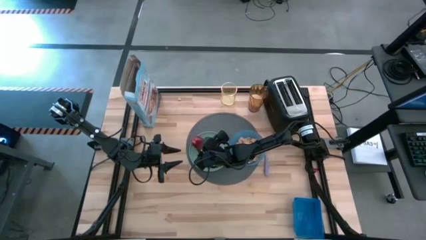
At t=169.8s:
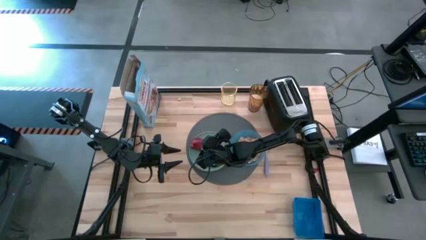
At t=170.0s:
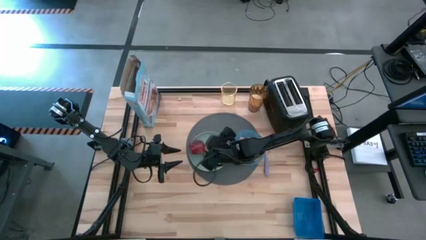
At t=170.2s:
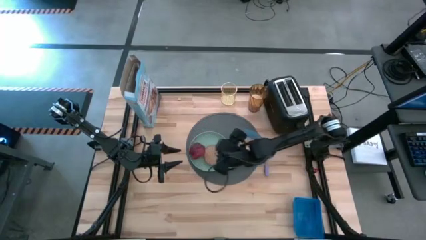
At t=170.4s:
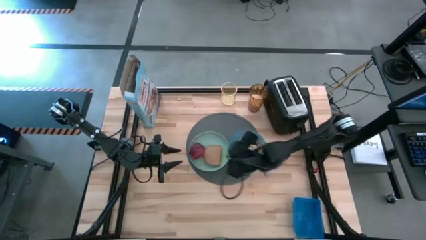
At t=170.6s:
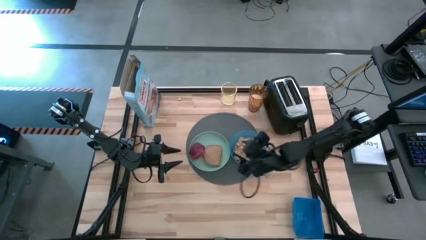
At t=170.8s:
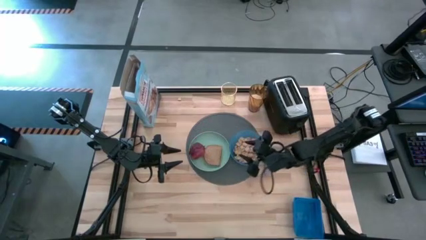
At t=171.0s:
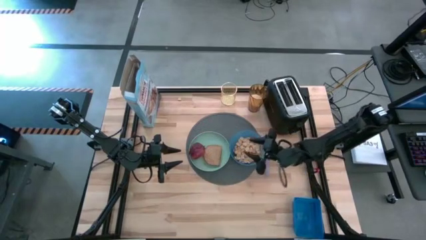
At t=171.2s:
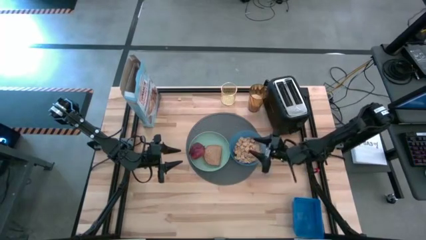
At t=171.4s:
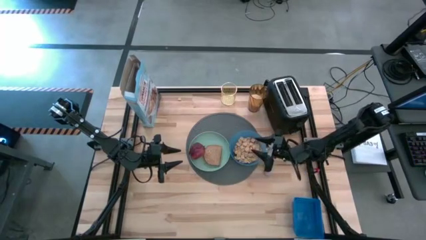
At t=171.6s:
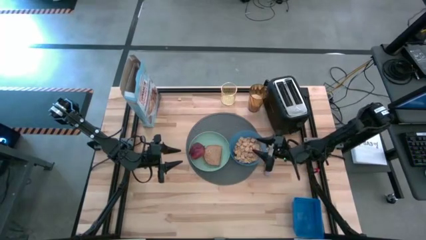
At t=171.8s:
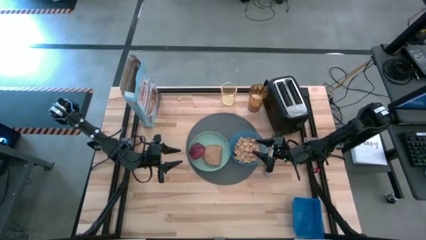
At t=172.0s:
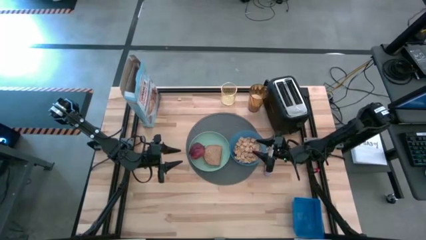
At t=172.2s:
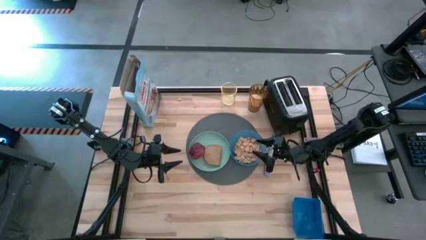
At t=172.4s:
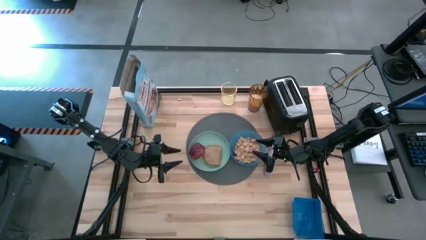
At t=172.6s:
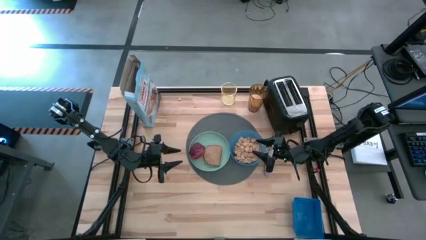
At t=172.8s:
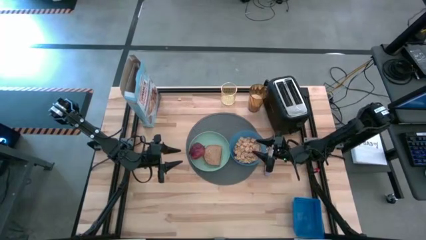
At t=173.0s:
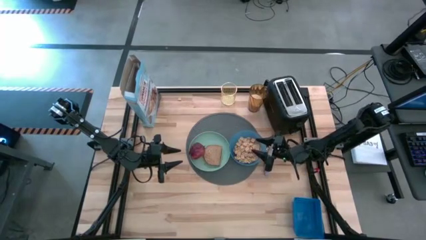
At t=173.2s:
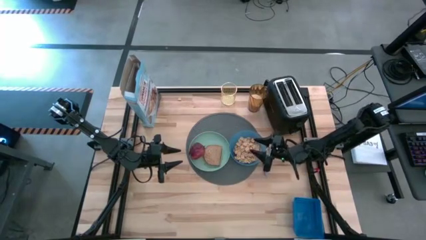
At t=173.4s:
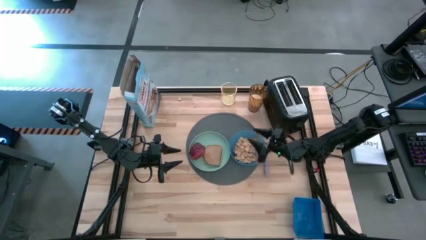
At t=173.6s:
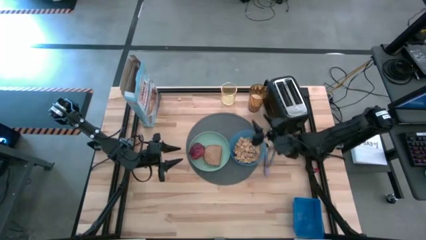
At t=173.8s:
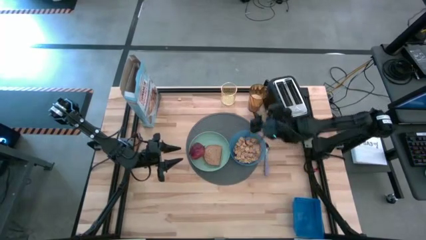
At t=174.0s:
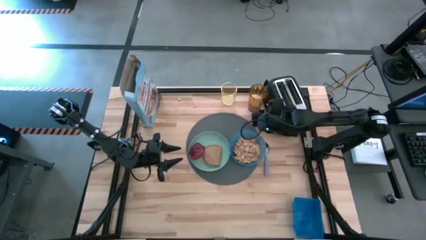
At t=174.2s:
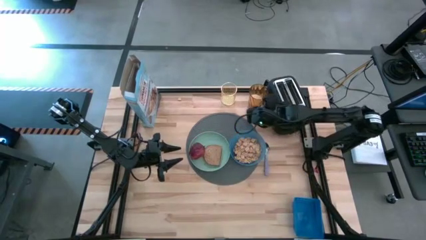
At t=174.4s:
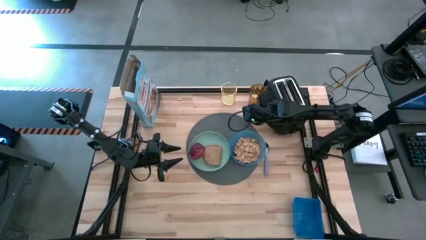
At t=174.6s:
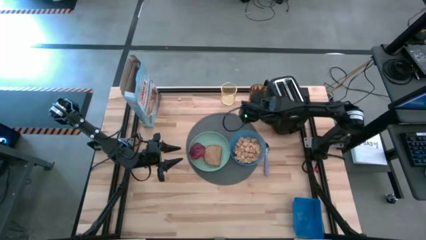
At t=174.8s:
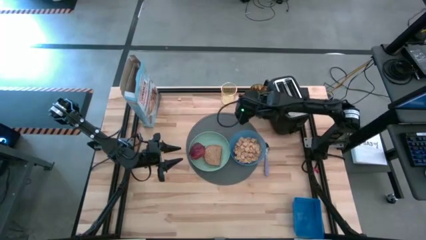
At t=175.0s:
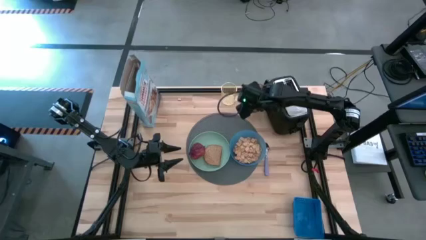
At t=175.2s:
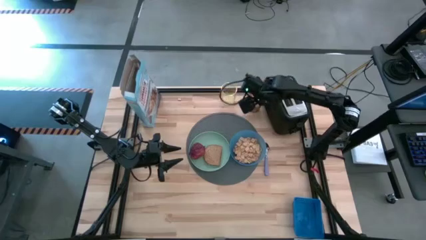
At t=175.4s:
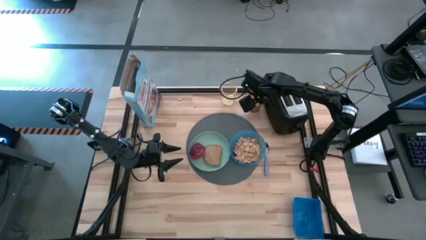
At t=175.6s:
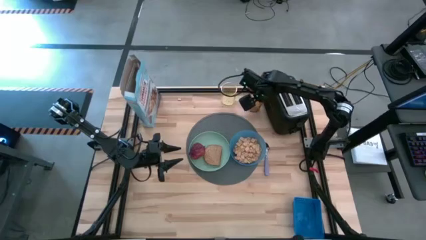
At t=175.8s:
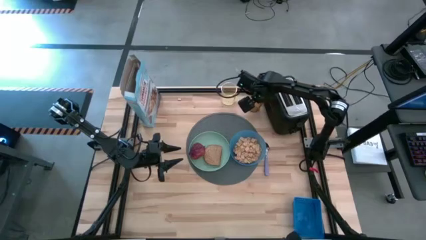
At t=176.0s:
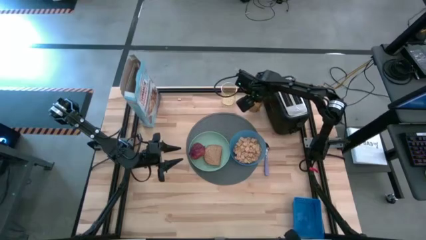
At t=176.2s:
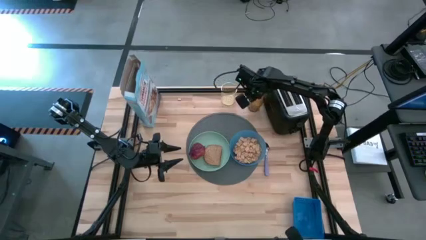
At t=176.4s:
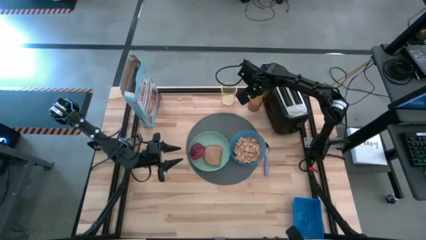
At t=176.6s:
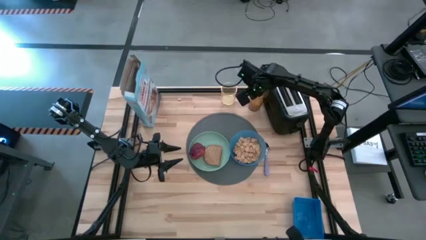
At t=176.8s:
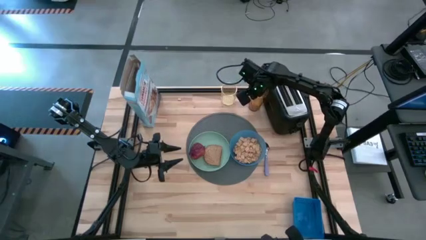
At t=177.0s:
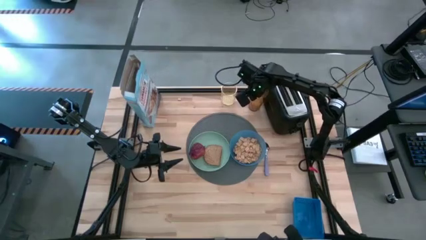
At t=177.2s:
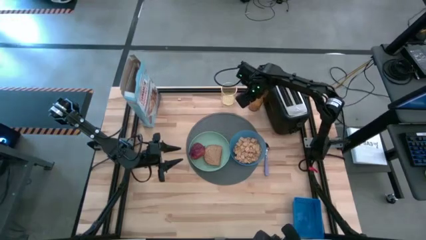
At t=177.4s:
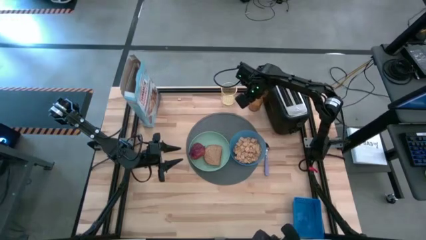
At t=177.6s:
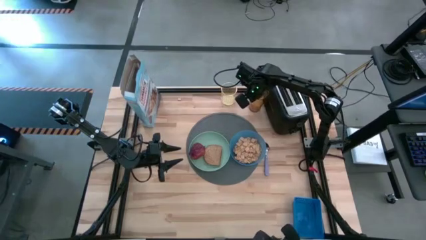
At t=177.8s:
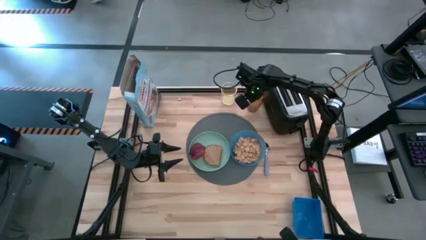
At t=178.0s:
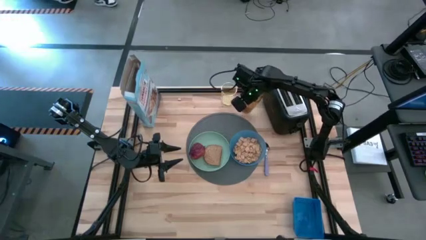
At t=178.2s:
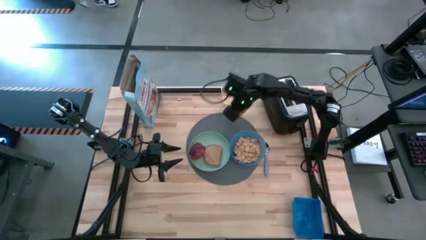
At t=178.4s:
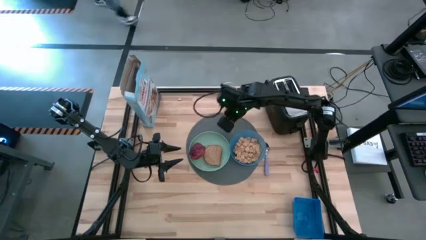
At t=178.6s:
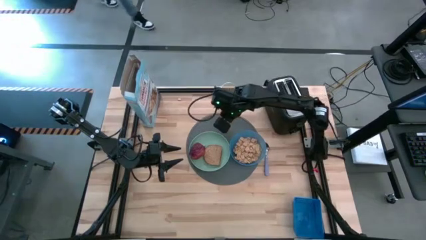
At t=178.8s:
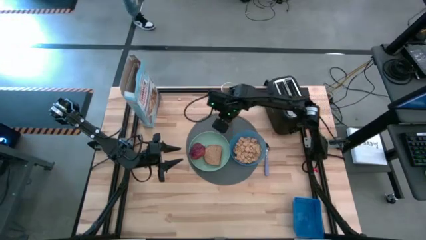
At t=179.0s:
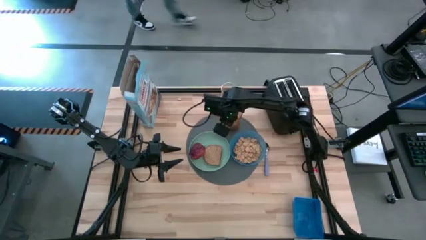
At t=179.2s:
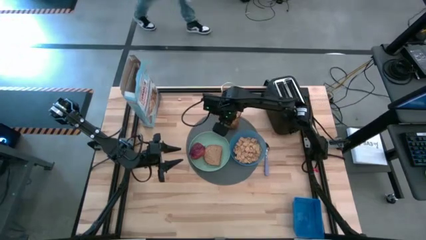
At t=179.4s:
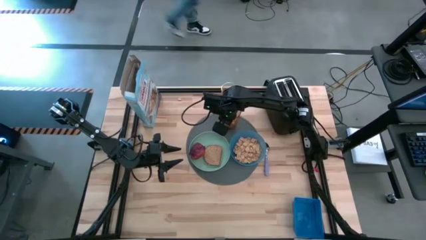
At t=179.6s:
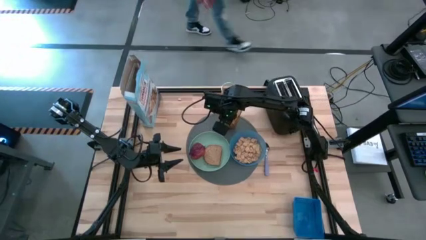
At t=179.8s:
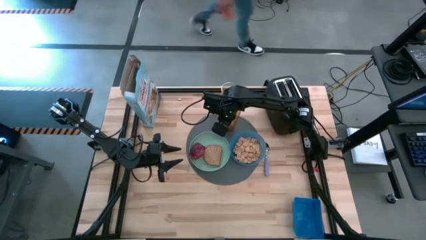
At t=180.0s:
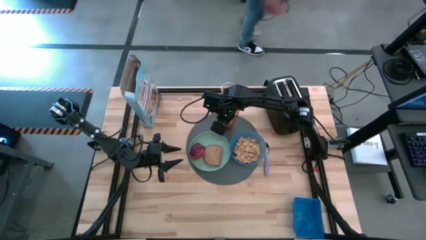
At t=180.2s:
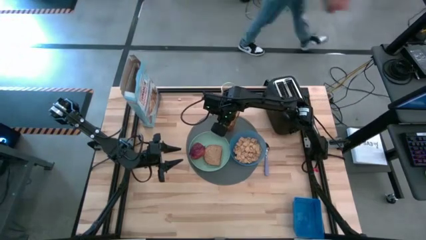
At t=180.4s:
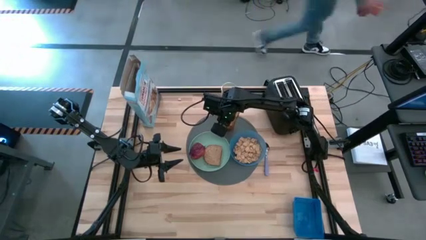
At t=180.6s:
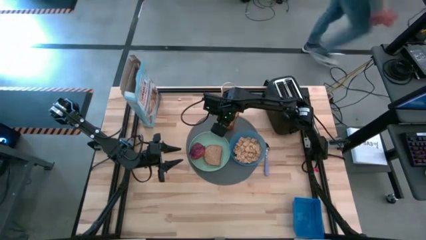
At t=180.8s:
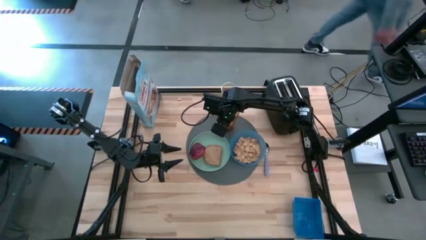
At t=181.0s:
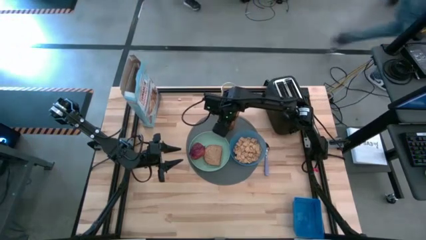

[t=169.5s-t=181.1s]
Task: Arrange a breakfast setting
Put the brown cup of milk on the gray table mat to the top right of the green plate

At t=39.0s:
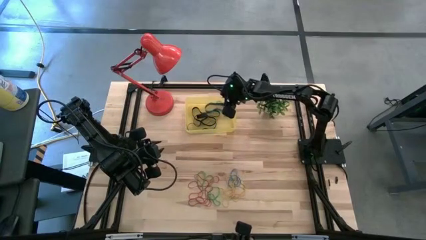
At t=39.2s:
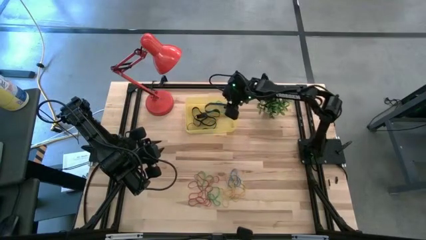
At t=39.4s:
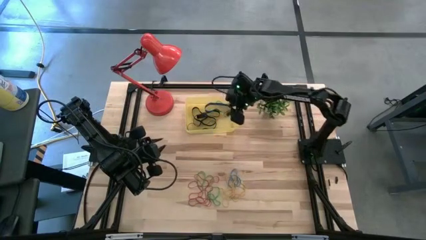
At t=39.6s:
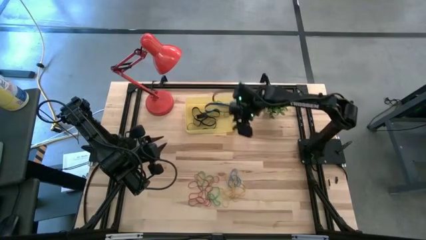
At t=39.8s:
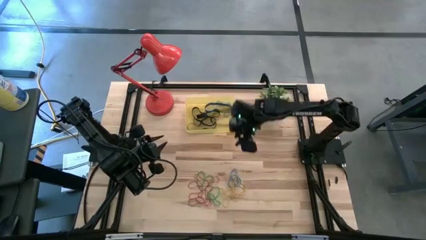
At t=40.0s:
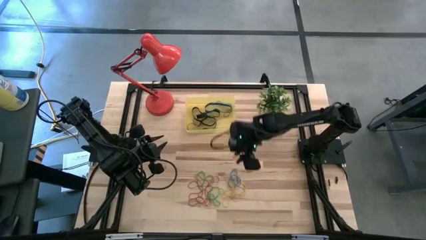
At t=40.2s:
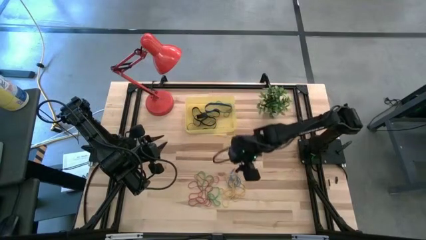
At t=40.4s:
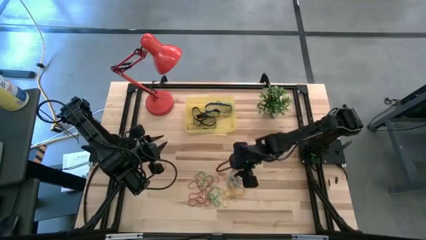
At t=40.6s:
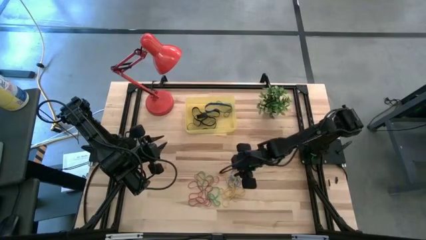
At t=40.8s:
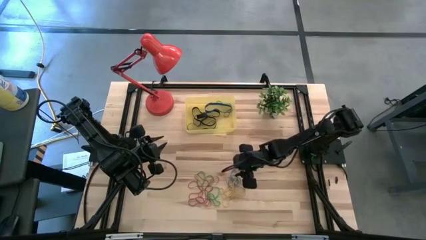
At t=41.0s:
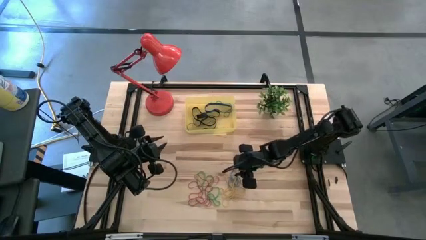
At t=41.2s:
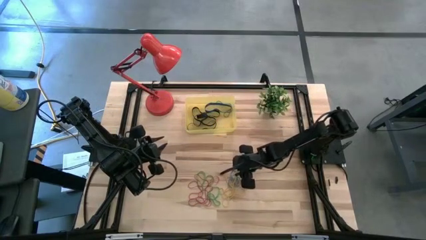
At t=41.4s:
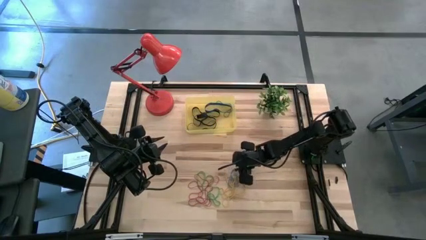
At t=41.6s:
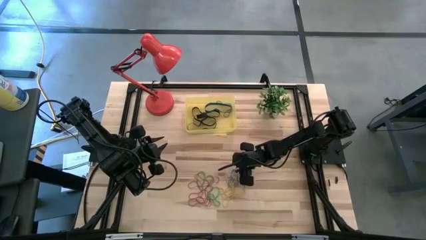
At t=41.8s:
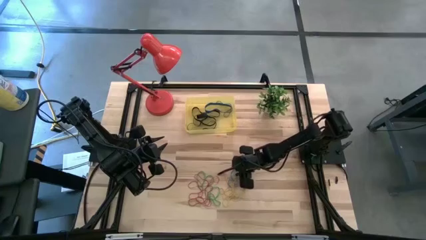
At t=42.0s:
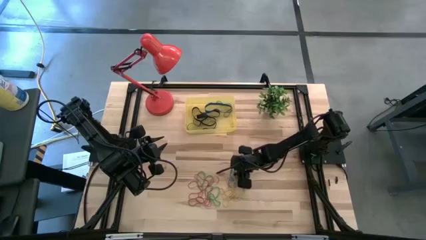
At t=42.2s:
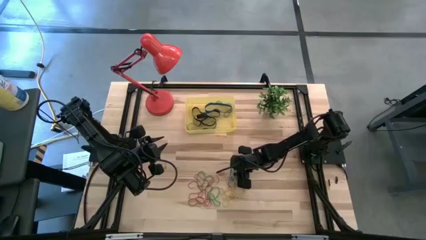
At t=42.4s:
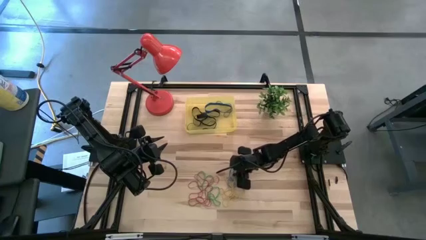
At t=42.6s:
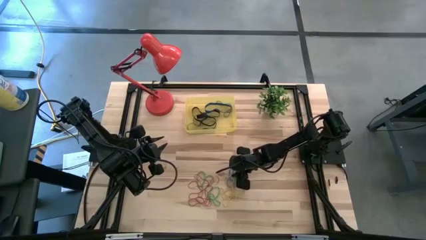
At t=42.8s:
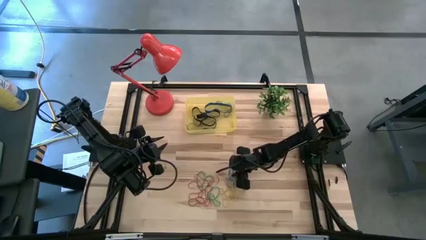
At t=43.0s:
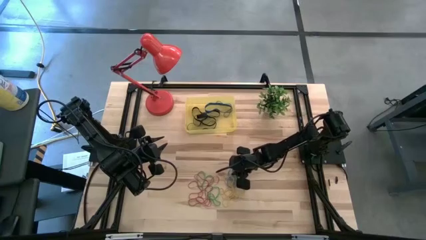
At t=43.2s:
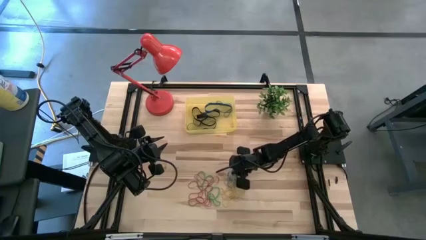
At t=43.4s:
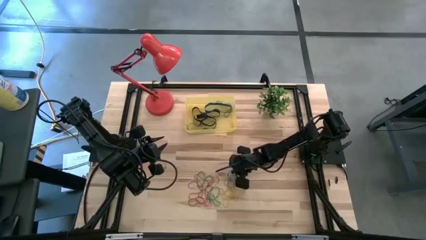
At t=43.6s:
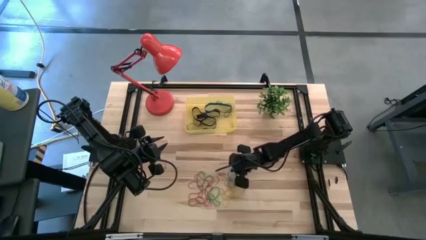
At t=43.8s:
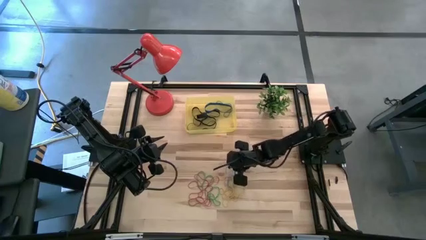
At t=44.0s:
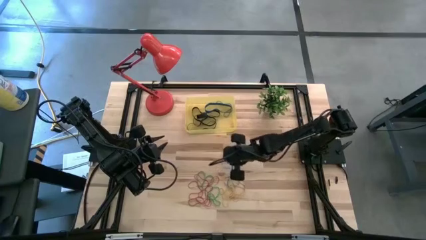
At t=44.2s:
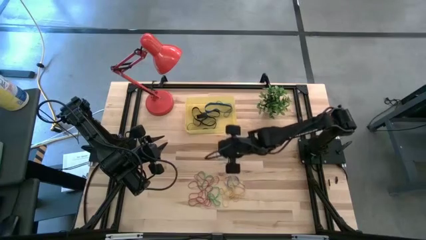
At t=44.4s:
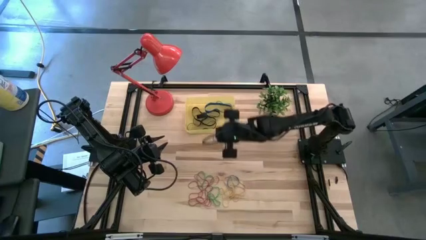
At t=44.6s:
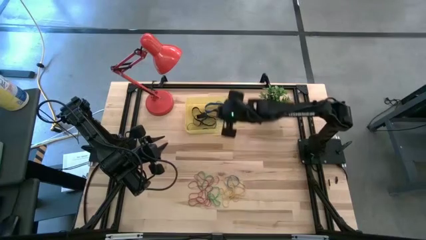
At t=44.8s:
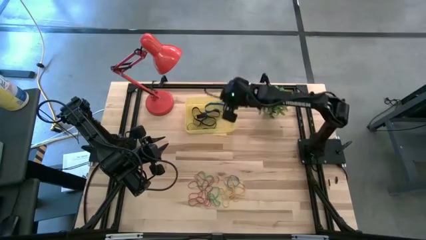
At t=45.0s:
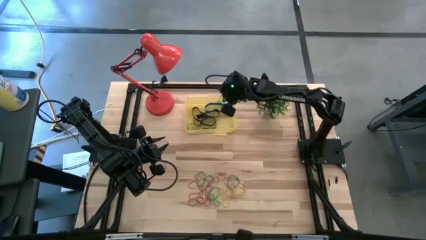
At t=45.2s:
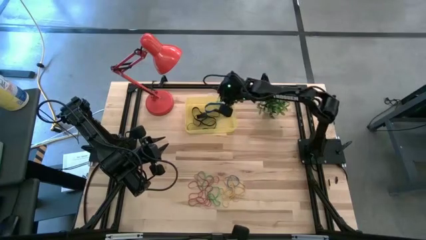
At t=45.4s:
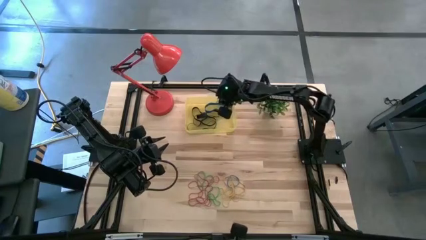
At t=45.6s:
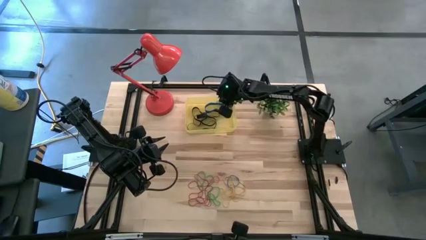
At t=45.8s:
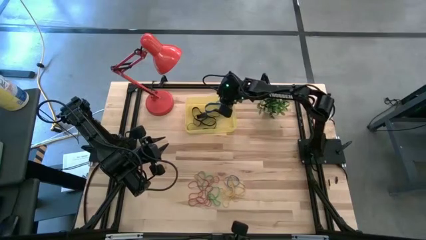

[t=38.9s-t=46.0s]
Task: Pick and place rubber bands into bin
Put the blue rubber band into the yellow container
